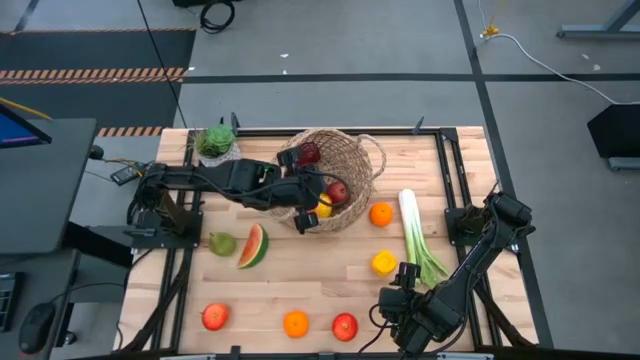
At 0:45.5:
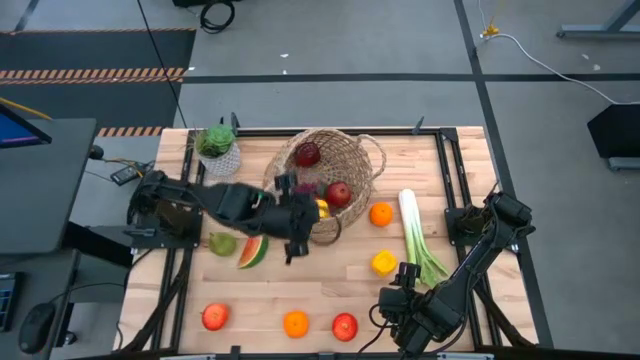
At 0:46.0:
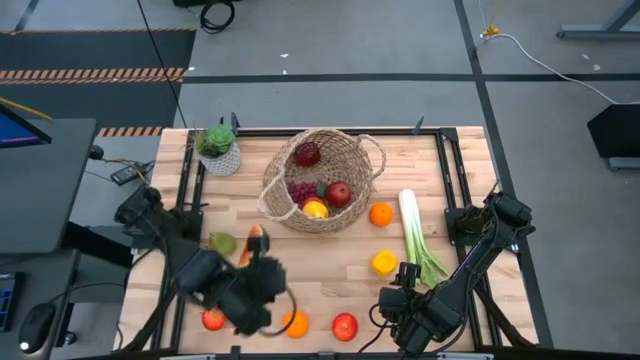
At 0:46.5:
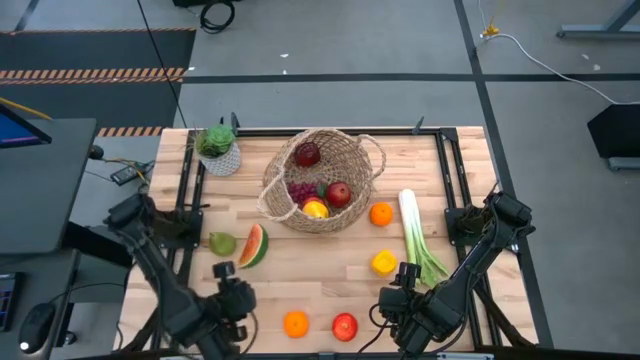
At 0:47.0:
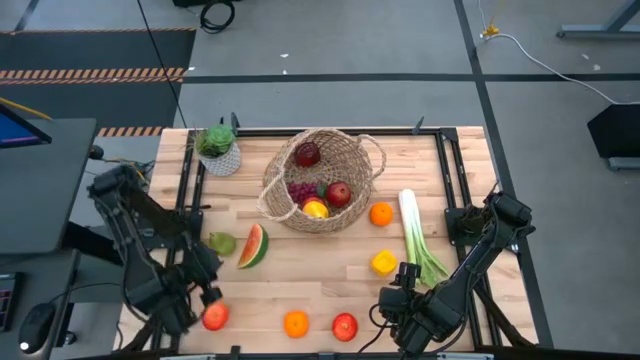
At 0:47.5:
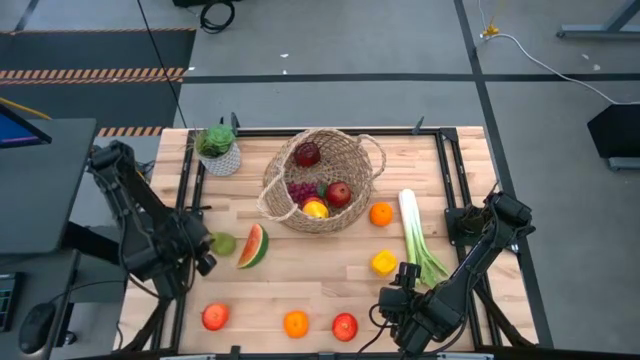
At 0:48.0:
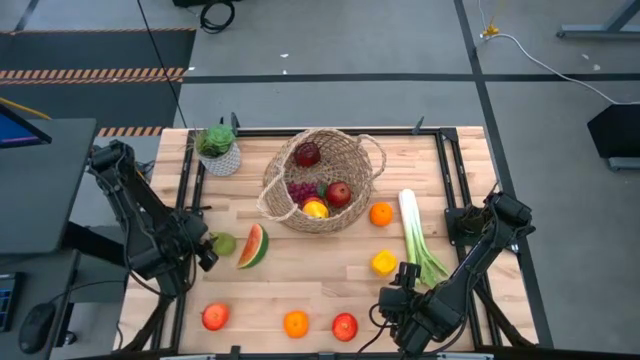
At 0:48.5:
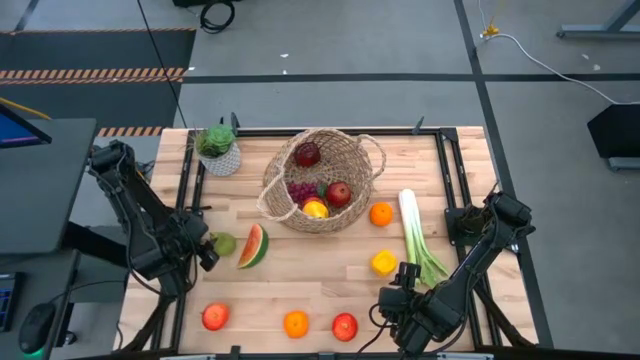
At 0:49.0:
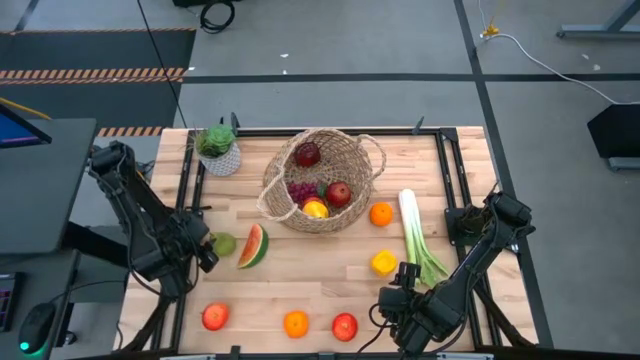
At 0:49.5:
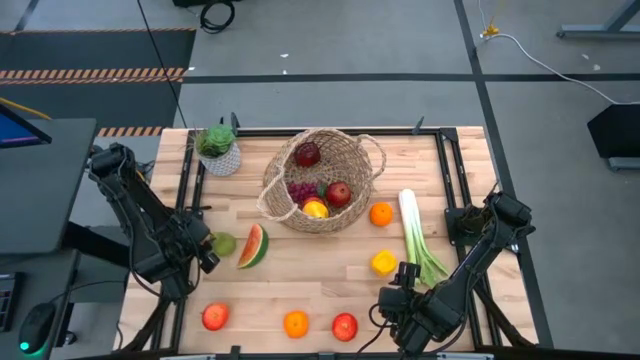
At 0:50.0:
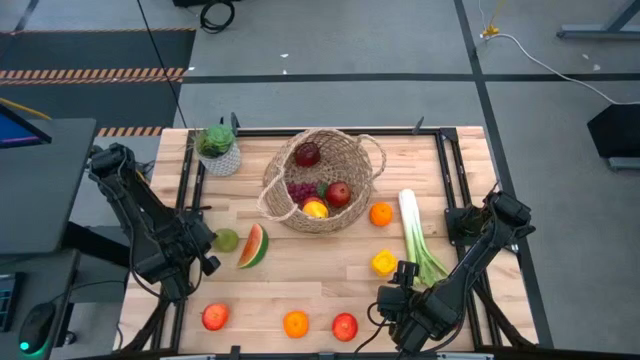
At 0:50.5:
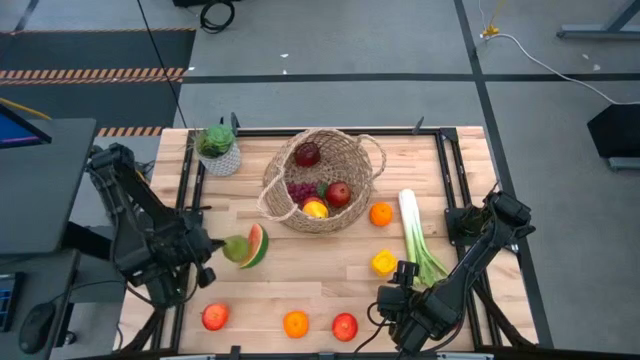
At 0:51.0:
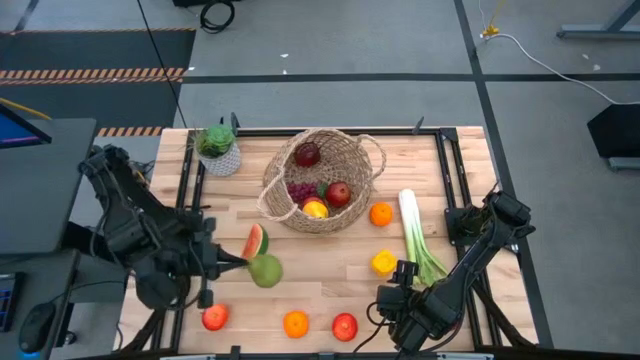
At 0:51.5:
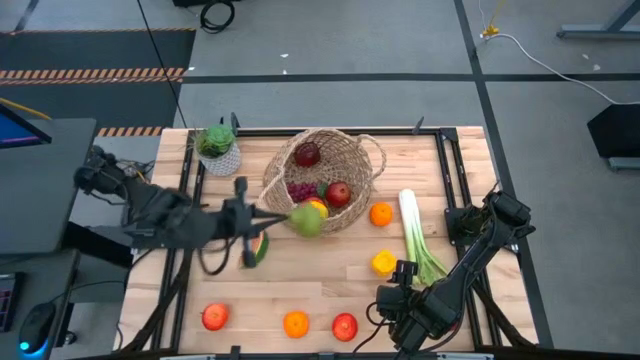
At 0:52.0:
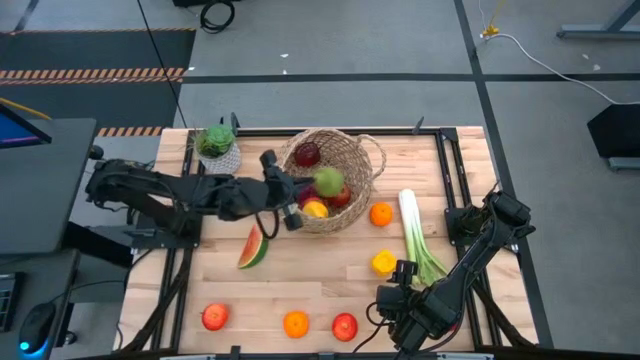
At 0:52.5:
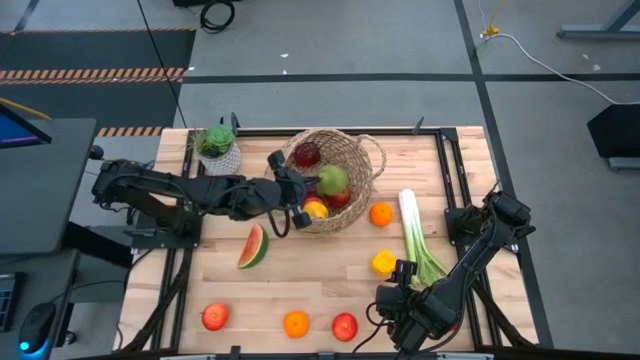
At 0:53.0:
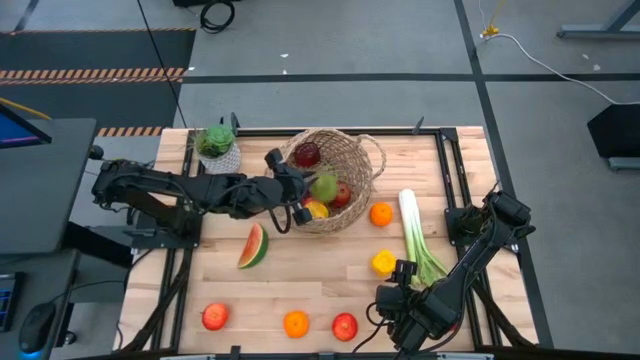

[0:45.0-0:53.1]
Task: Build produce basket
Put the green pear into the basket

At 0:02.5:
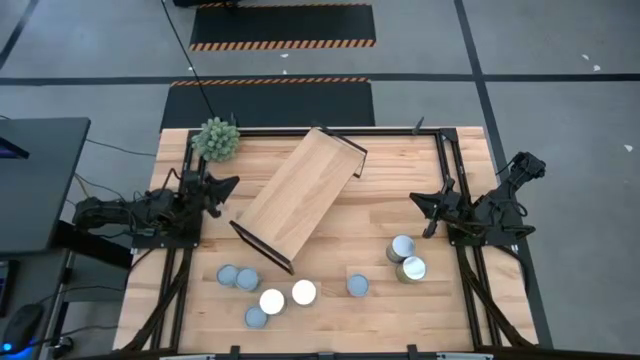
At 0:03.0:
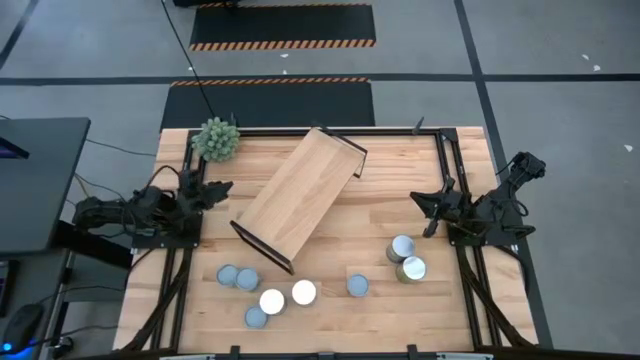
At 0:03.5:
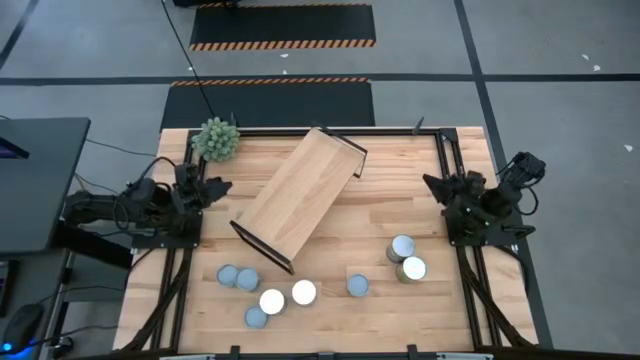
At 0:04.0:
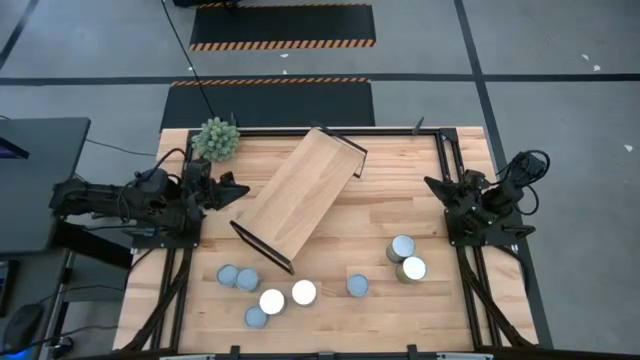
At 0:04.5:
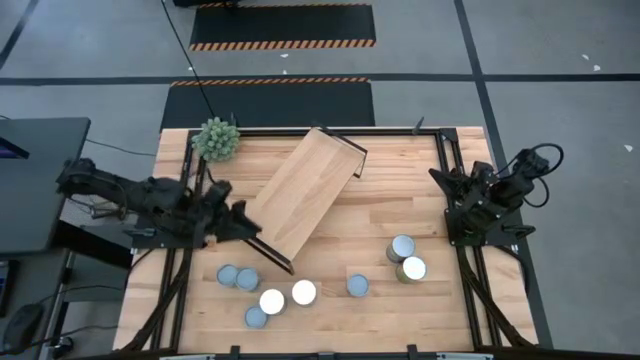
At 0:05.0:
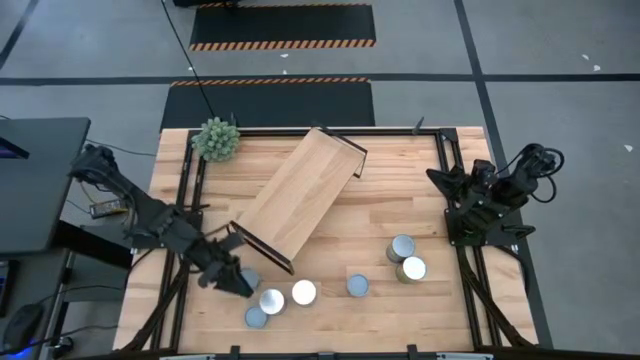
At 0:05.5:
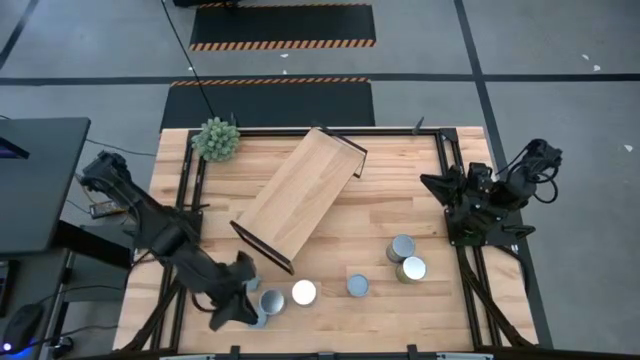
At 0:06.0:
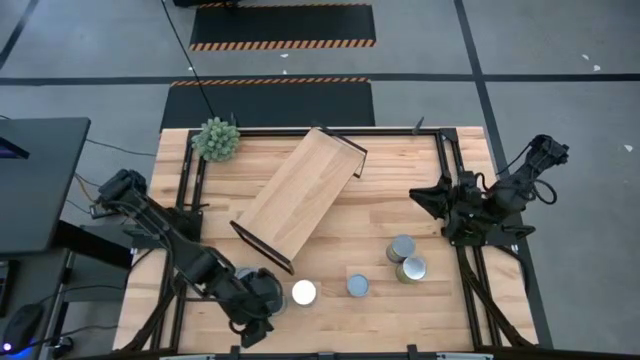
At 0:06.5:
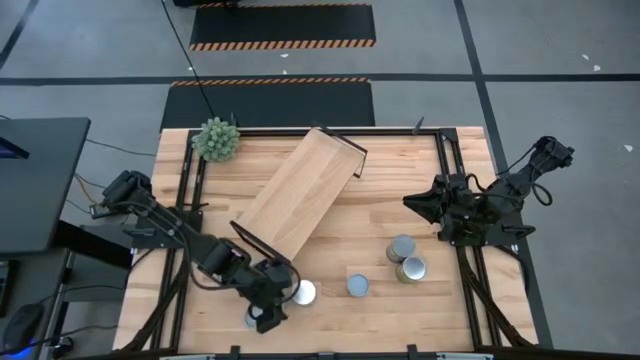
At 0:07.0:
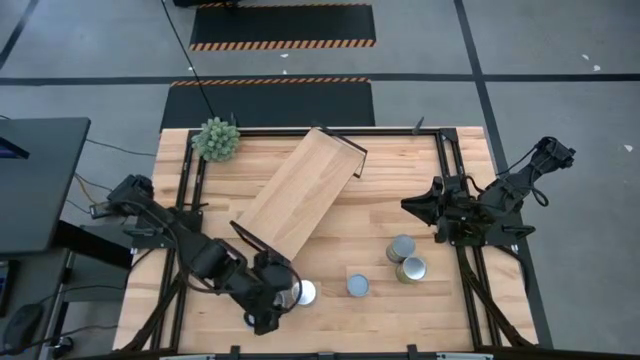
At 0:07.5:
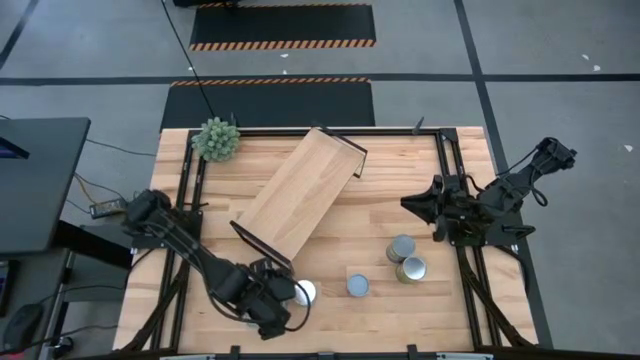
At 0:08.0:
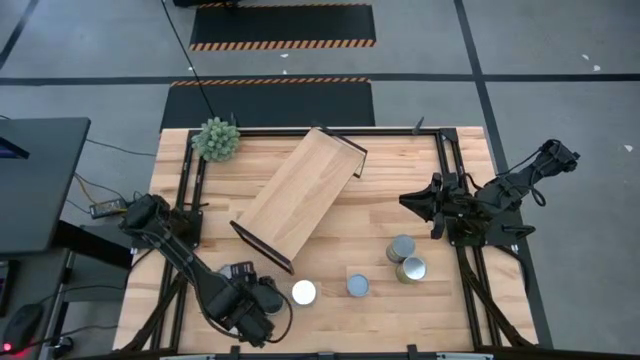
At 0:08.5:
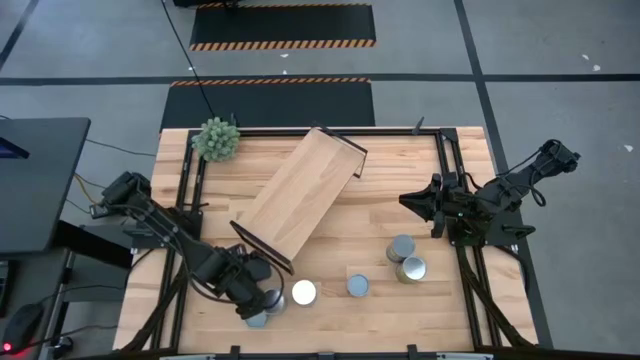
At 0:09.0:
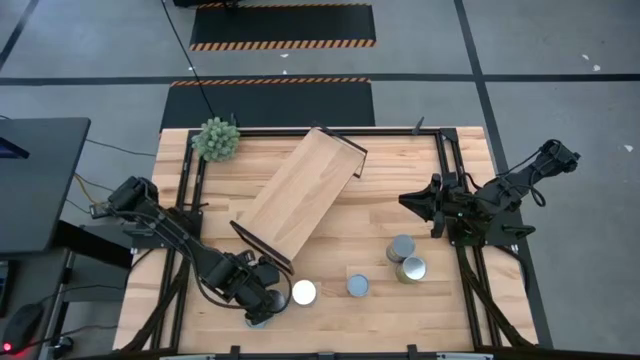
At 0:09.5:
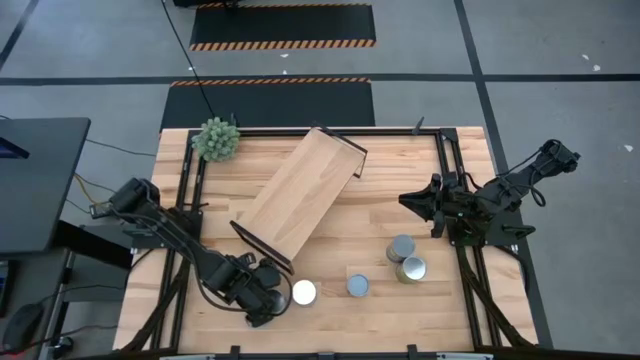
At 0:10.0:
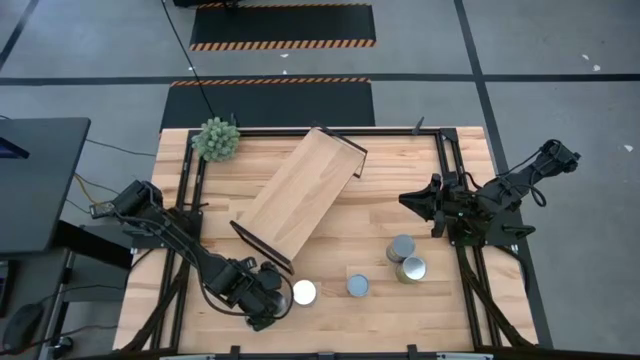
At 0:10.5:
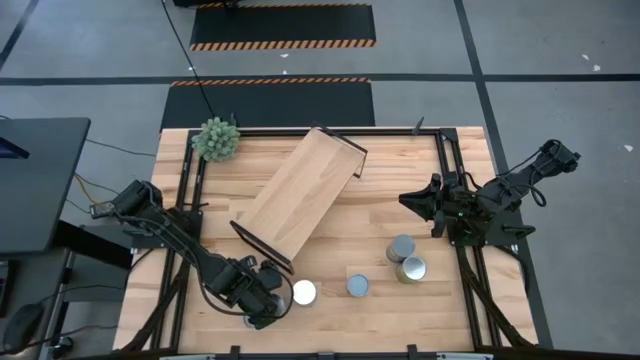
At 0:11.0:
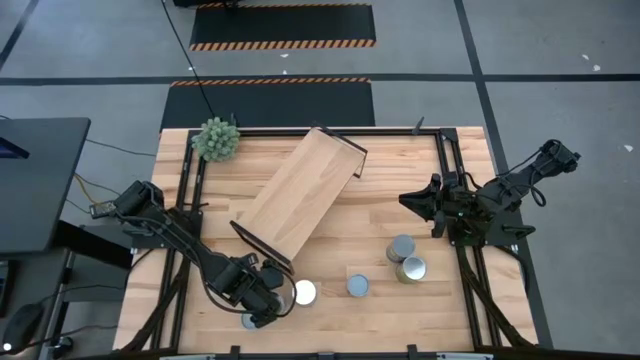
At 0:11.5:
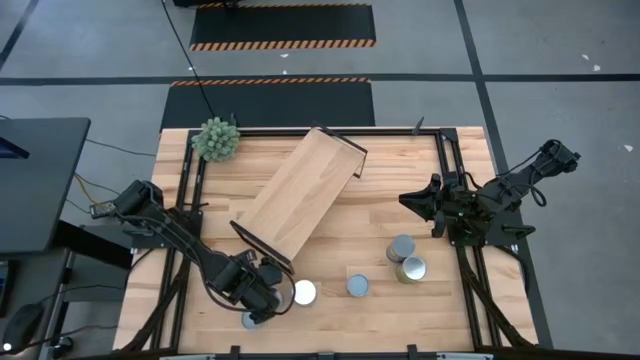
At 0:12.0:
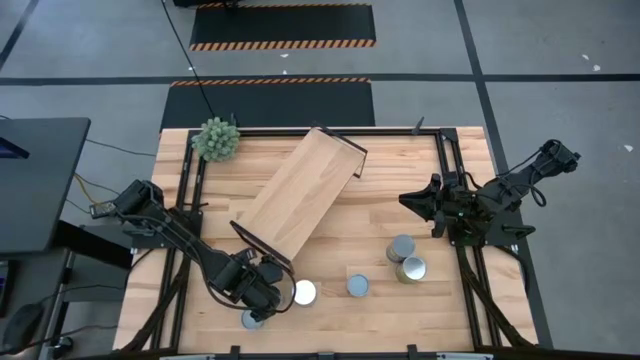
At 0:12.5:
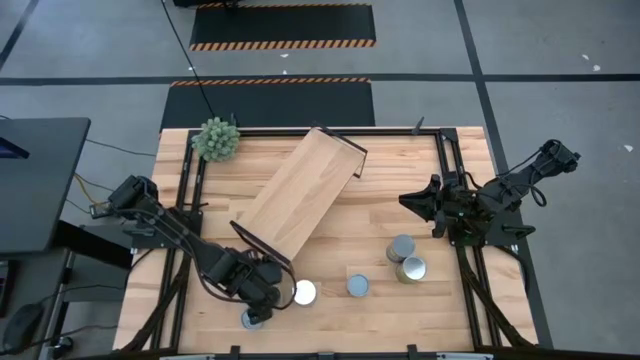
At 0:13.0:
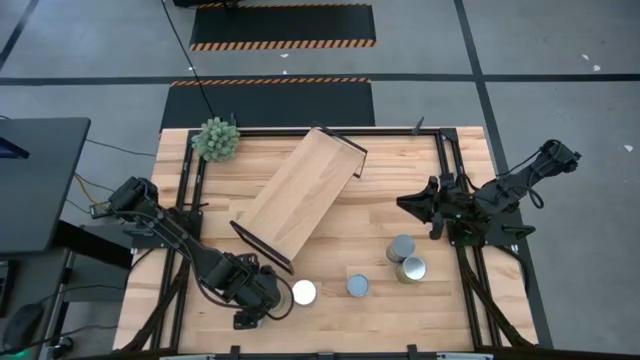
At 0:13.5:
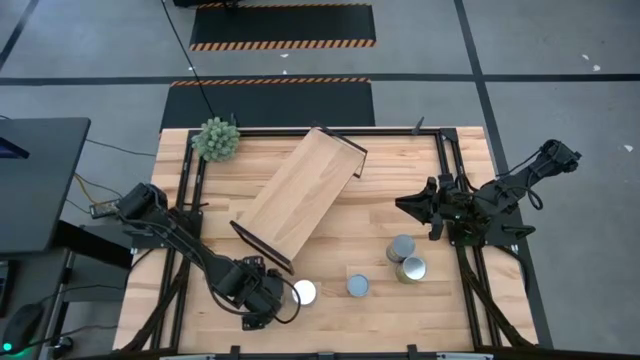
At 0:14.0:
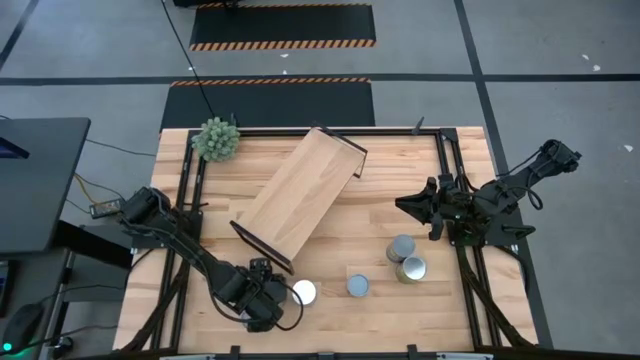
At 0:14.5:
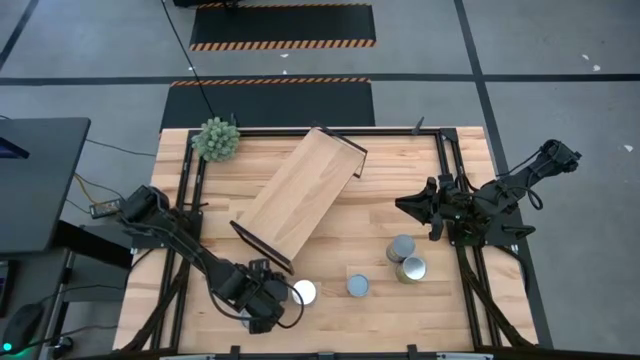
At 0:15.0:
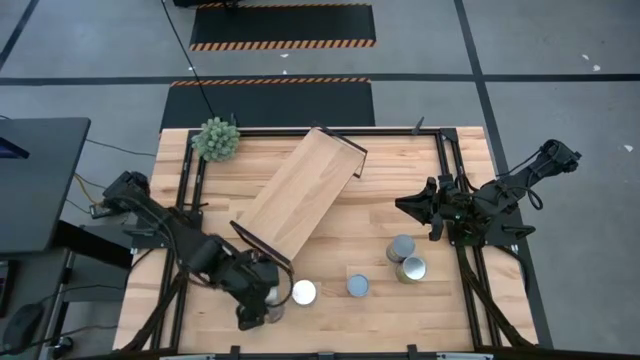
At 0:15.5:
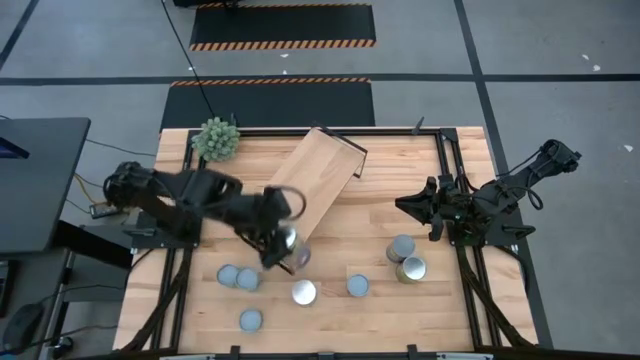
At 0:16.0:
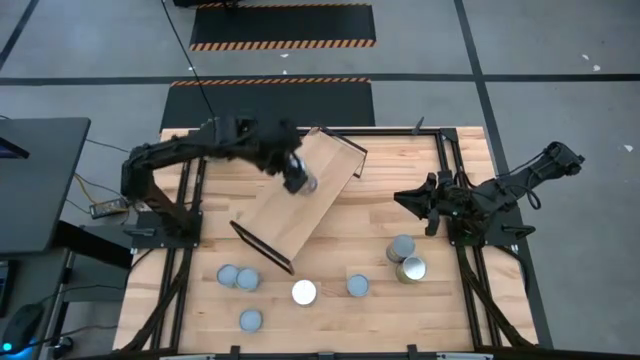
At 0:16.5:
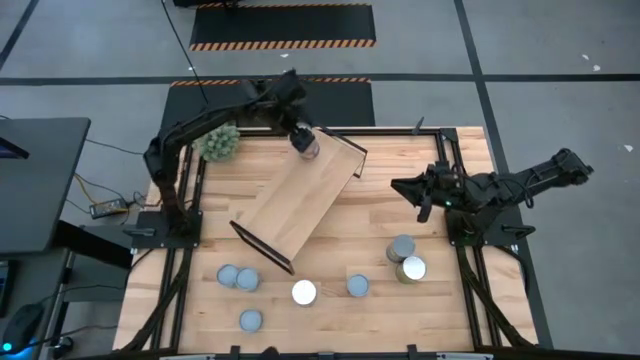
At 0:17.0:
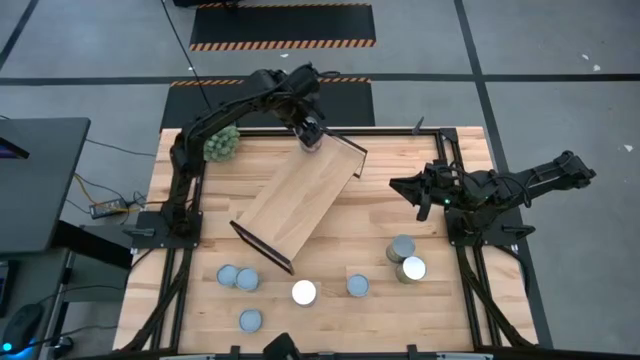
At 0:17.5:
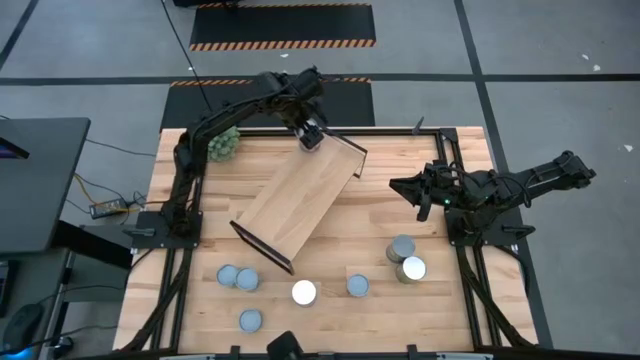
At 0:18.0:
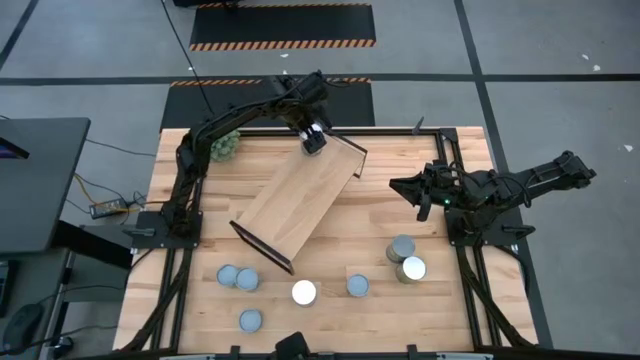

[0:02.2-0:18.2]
Task: Pick and place cans onto a shelf
Put the canned peaches on the shelf
